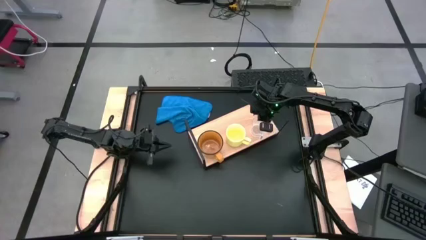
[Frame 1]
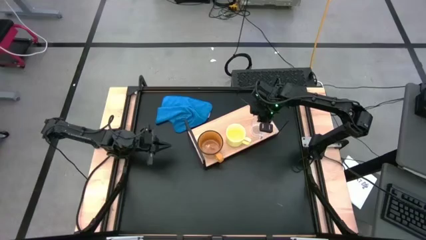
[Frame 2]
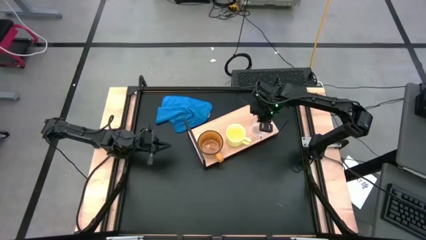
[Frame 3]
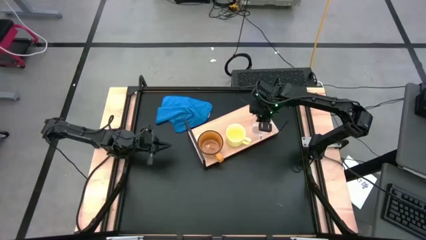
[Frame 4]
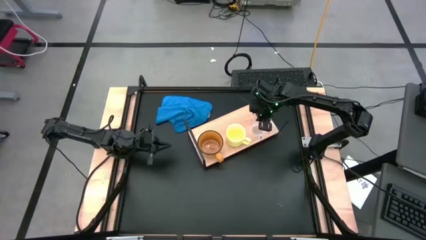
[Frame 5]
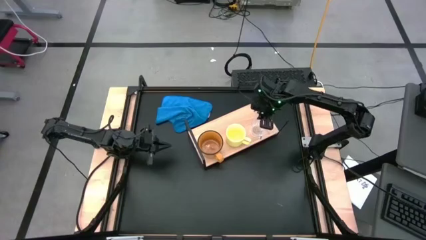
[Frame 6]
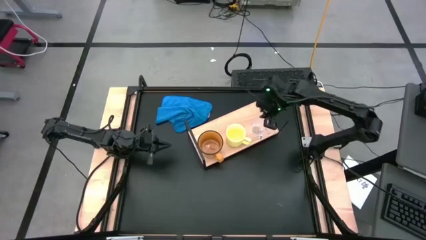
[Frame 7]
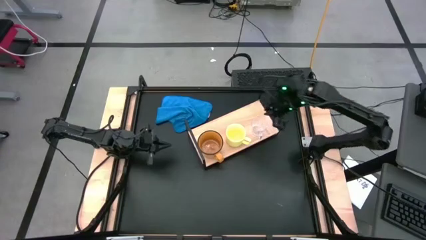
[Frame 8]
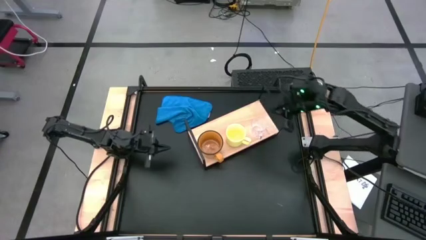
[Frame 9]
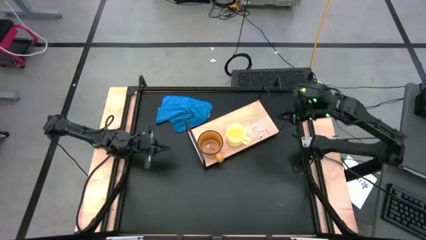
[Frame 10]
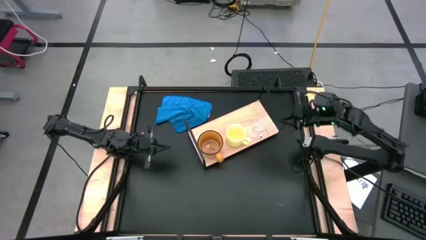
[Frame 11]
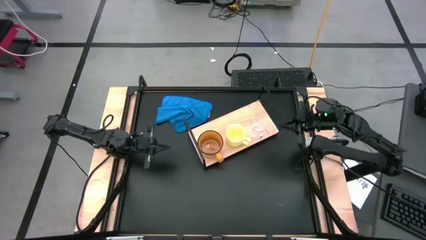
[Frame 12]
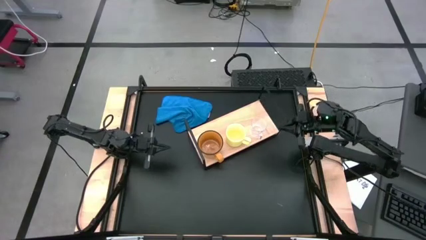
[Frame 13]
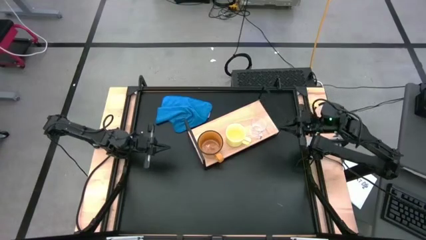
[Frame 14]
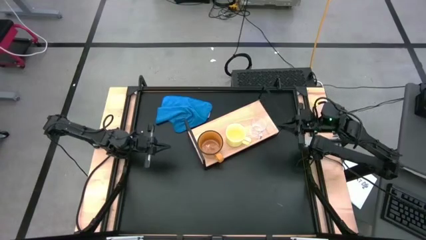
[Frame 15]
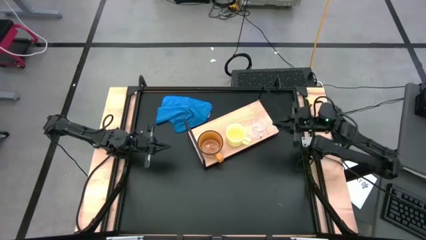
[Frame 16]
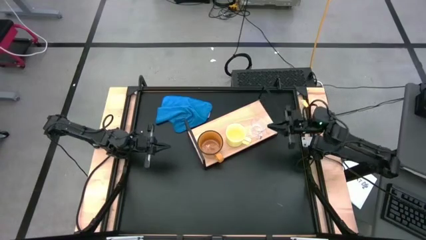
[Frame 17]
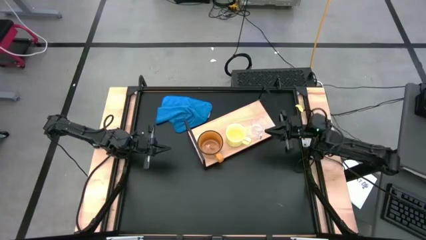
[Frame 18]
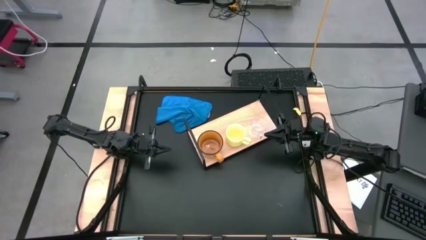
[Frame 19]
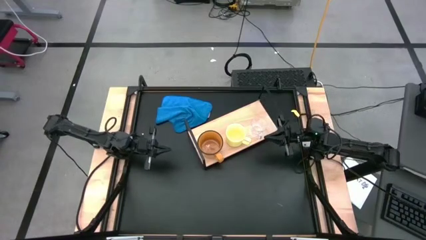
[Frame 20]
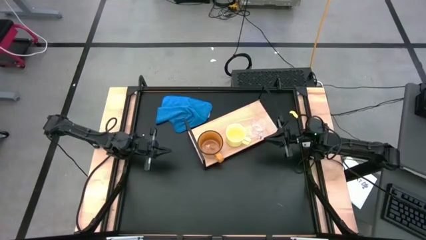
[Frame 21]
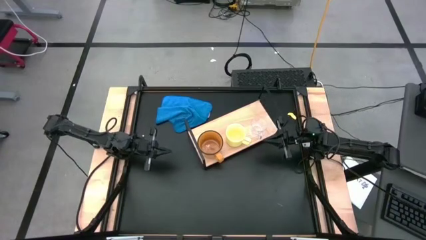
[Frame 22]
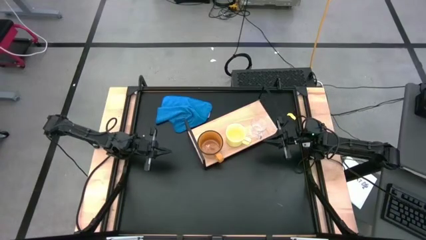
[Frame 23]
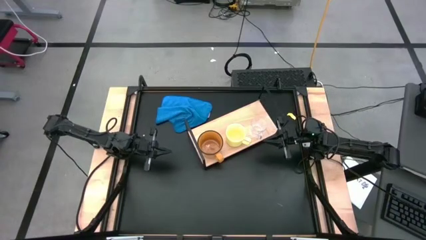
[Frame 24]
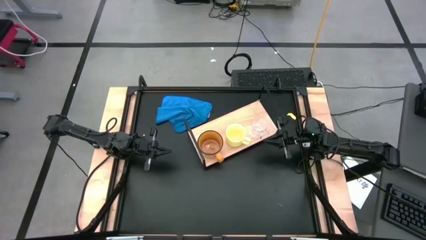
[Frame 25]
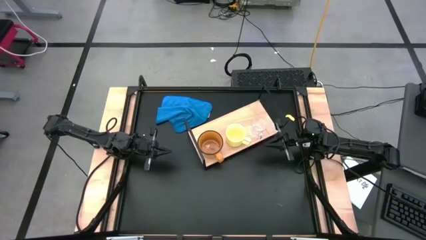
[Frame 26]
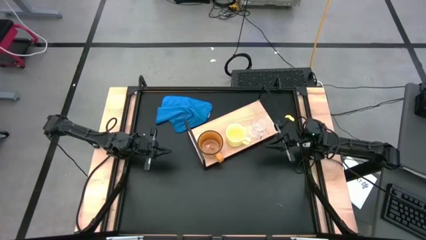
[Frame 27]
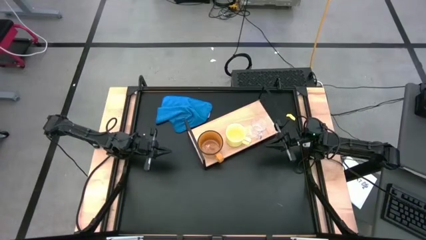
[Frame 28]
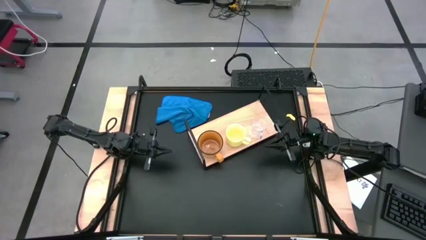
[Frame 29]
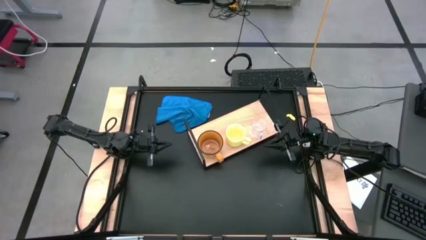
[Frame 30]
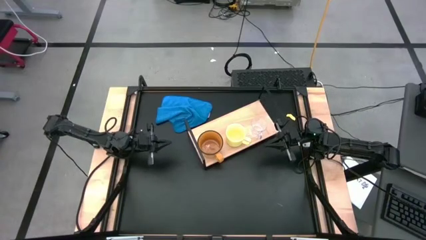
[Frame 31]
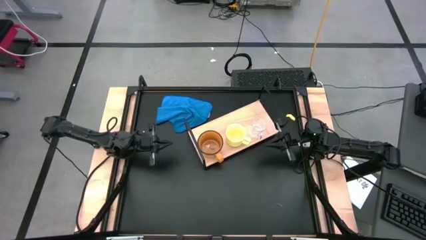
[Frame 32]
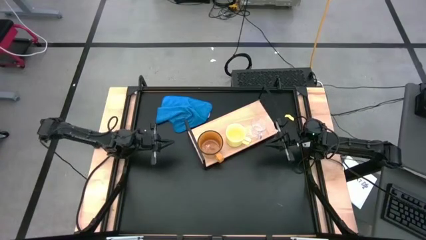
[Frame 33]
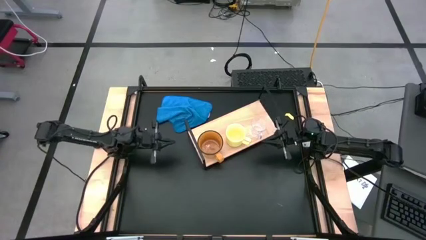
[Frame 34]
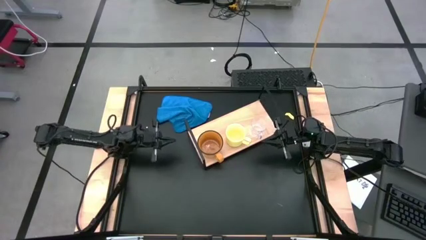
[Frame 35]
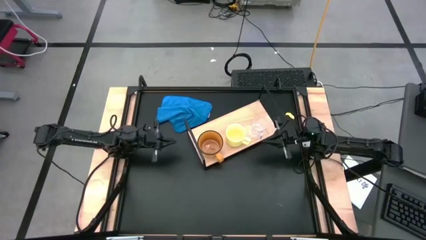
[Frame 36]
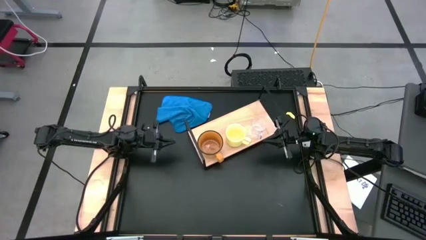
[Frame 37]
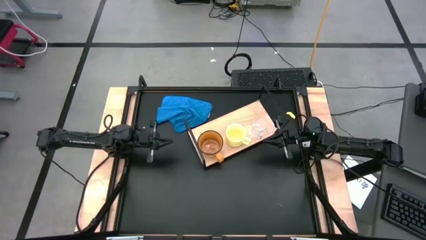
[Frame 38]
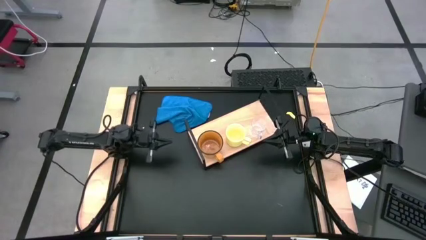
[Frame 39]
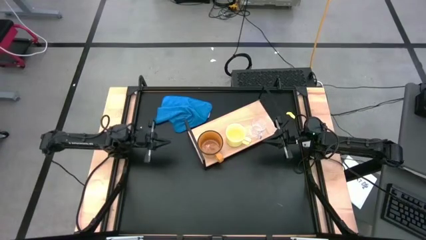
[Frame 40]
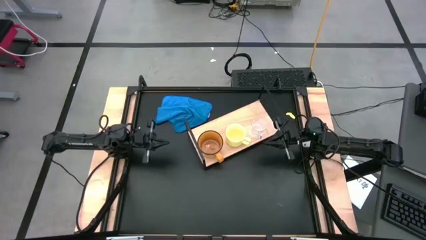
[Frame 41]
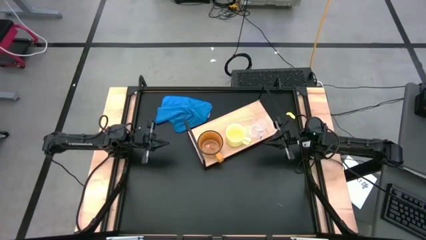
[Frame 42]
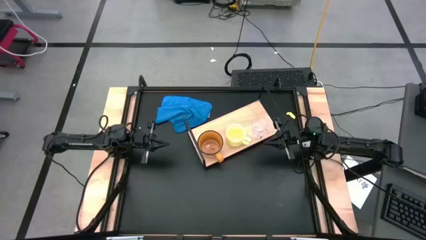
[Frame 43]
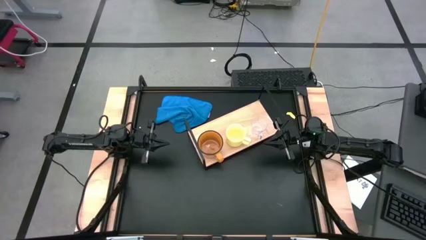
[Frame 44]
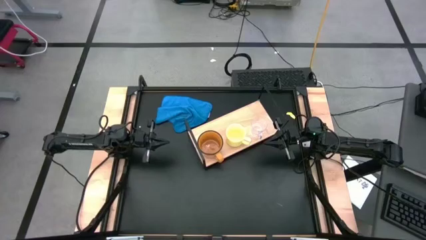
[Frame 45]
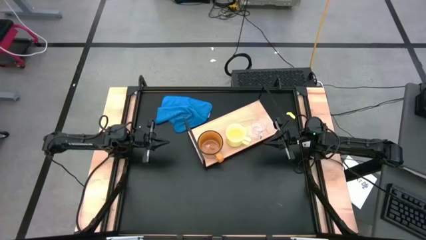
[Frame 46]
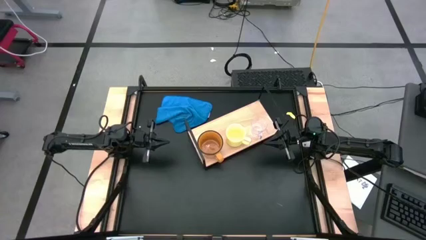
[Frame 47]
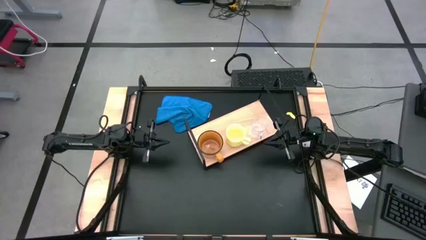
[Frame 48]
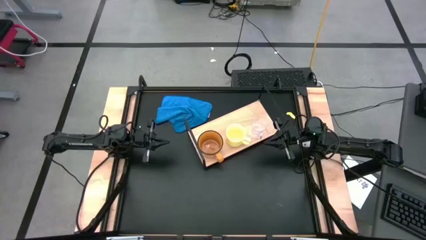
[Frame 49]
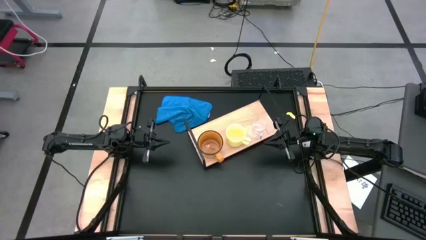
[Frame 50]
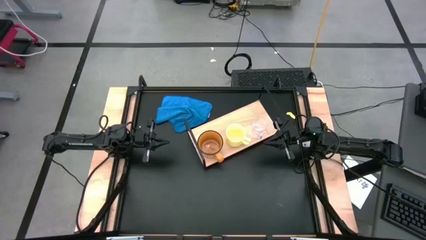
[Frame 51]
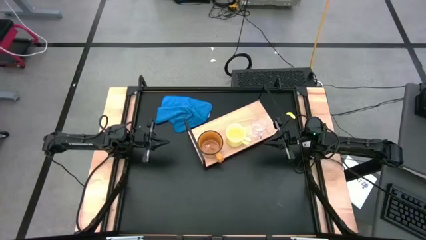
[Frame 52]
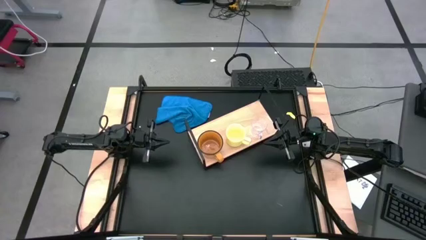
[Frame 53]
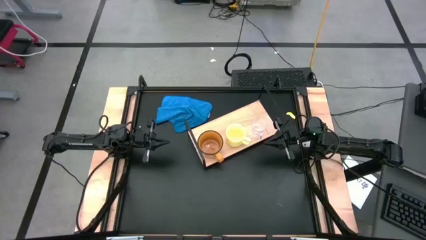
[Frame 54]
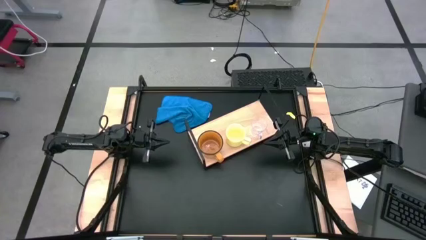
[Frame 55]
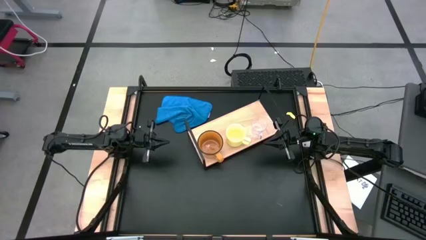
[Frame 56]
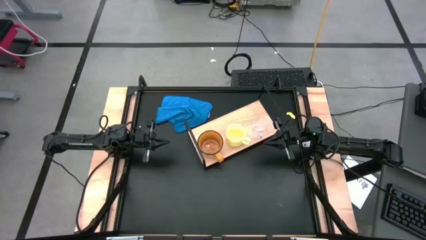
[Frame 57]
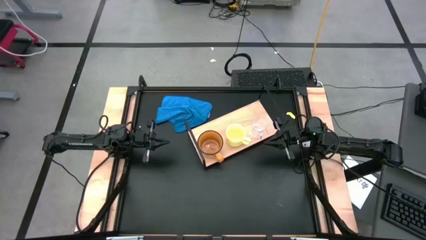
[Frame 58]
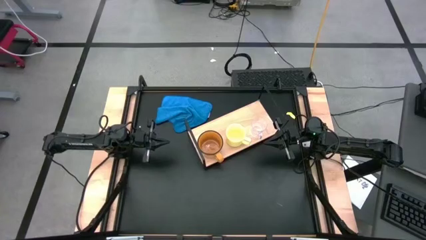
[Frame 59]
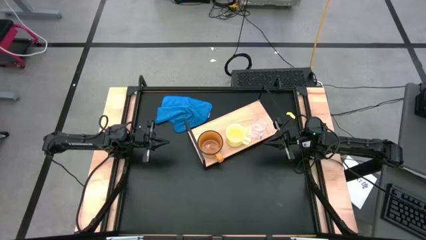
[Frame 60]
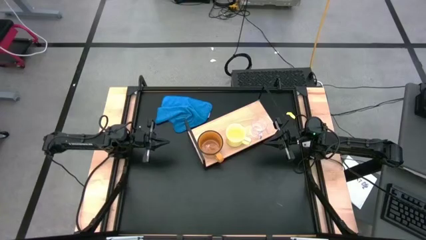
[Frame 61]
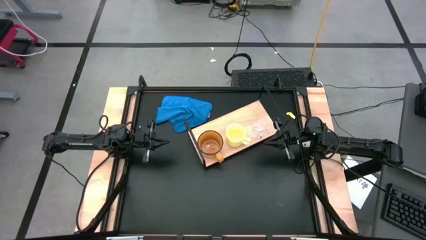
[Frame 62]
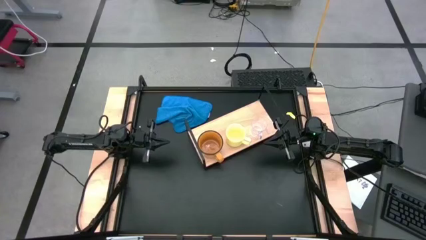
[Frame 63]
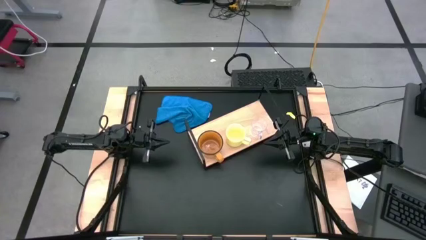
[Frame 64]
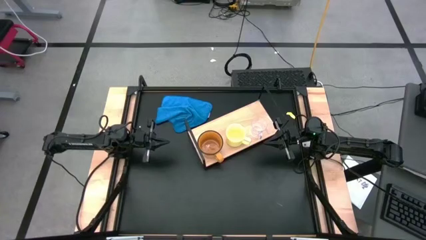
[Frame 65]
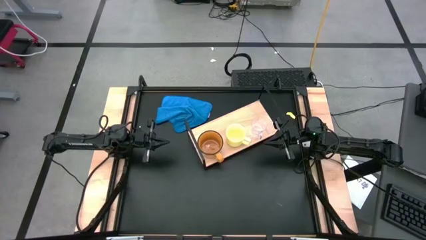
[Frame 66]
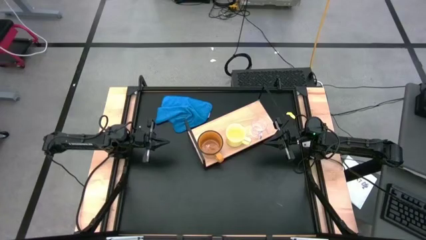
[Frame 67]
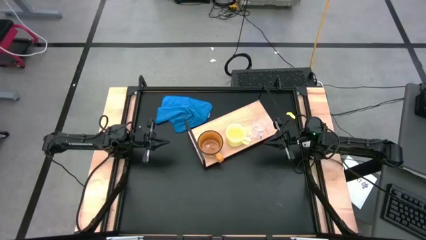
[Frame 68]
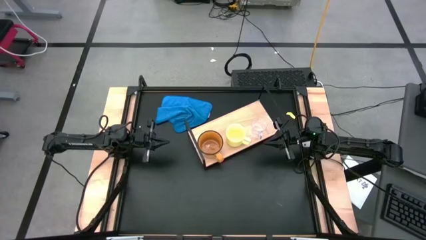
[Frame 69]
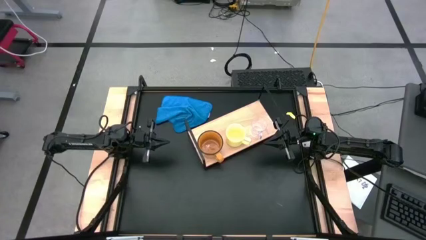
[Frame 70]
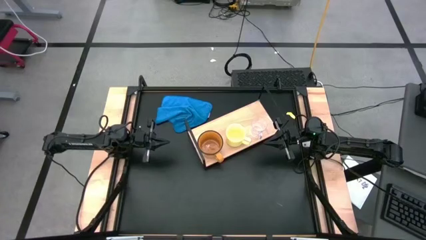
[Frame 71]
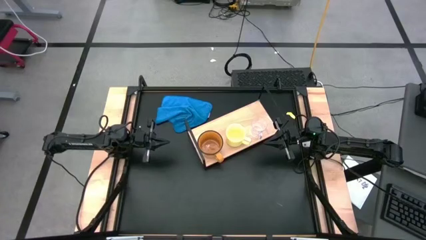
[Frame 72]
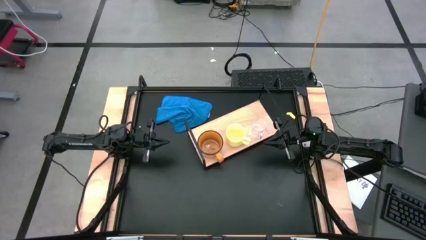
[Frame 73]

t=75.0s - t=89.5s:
Task: Stack small to large cups/mugs on shelf
Return to Home Position
